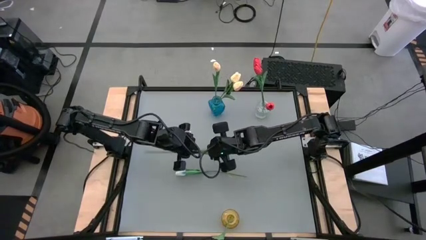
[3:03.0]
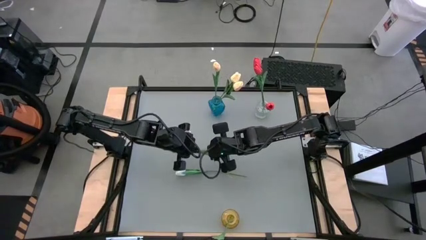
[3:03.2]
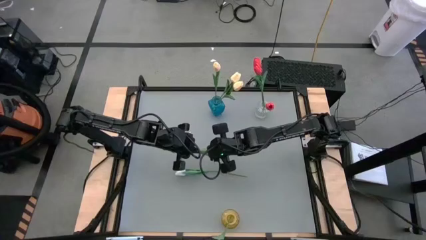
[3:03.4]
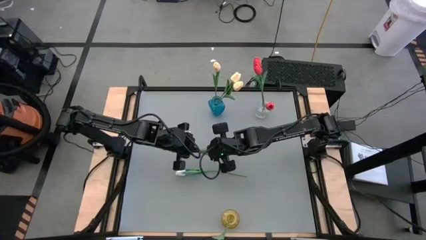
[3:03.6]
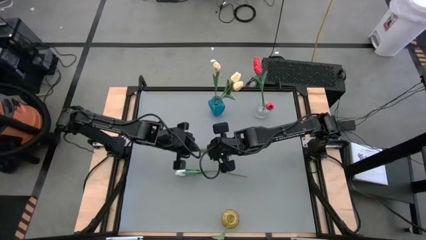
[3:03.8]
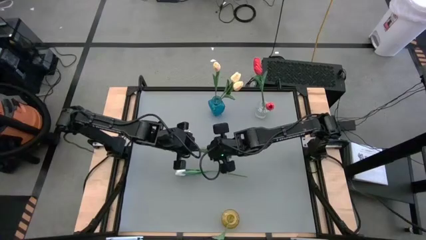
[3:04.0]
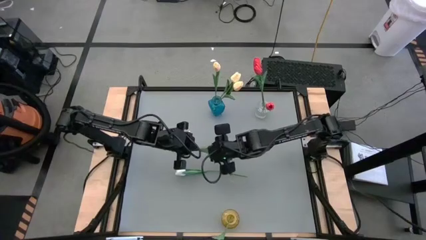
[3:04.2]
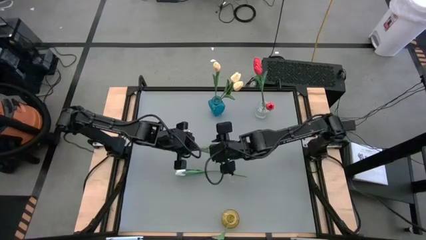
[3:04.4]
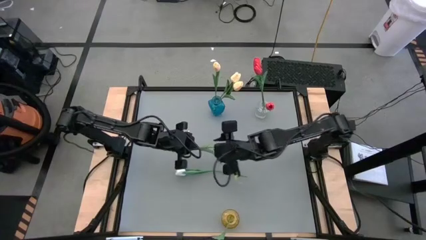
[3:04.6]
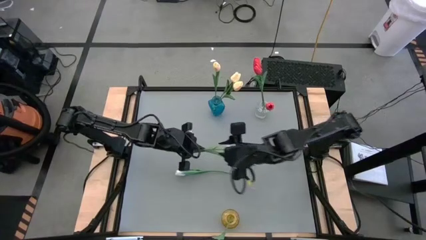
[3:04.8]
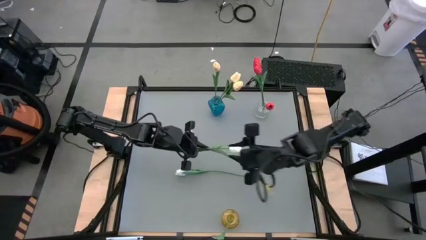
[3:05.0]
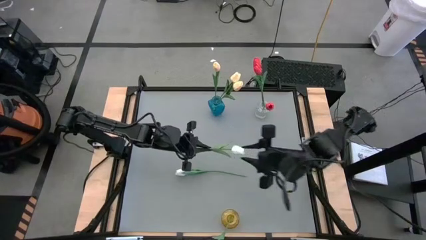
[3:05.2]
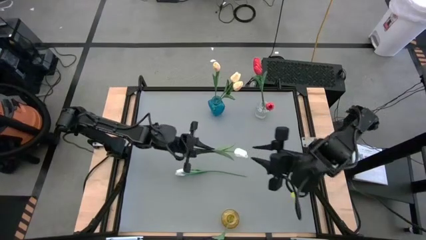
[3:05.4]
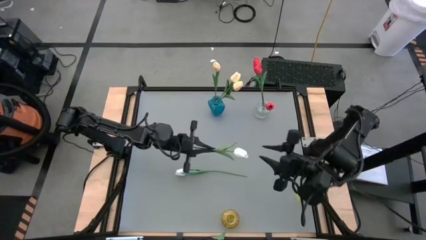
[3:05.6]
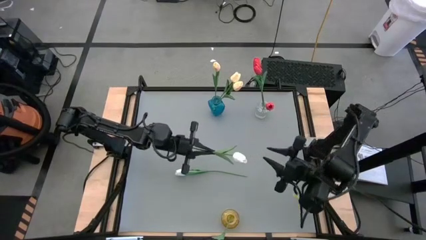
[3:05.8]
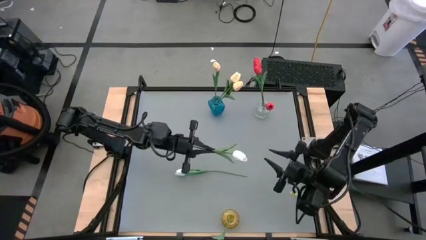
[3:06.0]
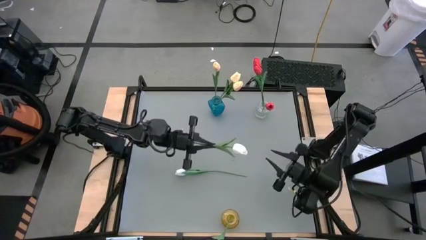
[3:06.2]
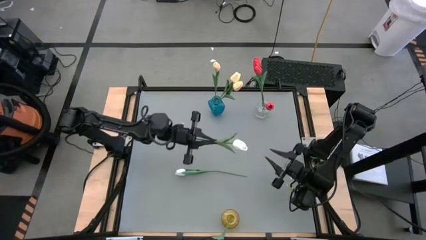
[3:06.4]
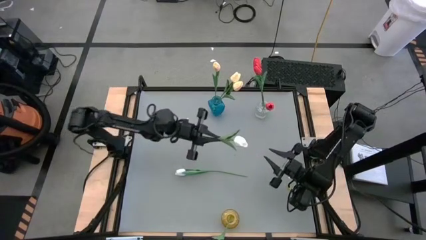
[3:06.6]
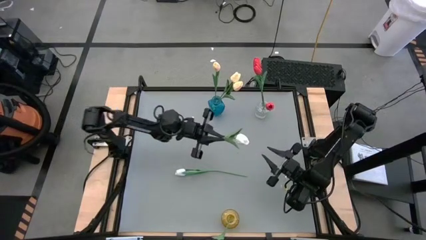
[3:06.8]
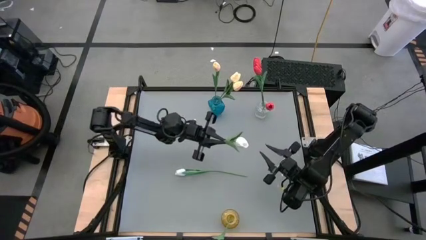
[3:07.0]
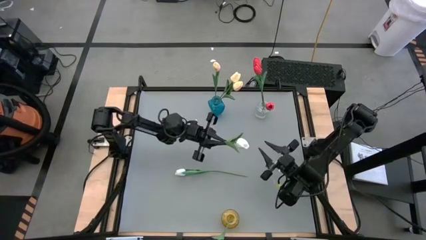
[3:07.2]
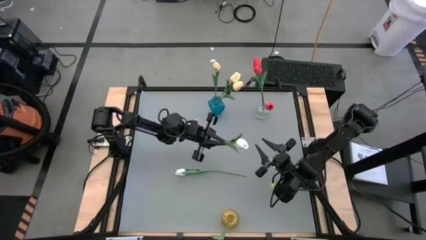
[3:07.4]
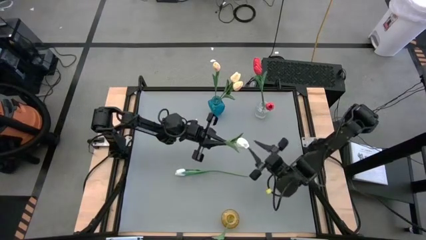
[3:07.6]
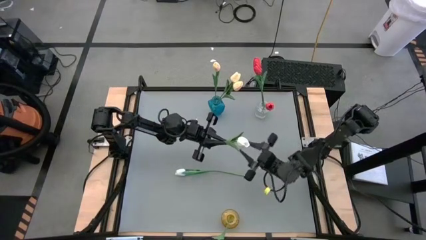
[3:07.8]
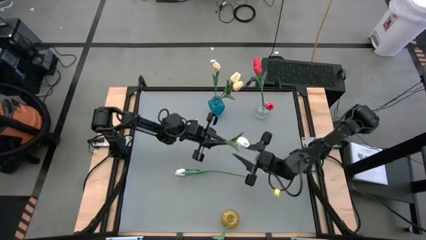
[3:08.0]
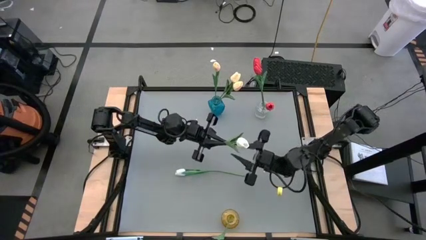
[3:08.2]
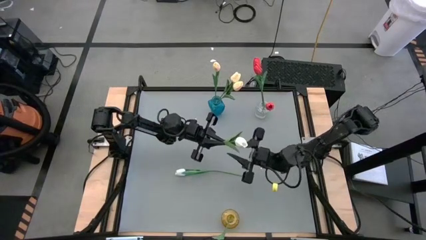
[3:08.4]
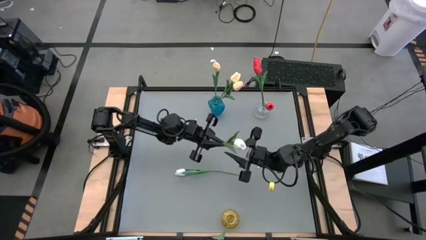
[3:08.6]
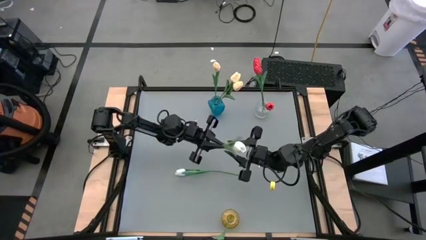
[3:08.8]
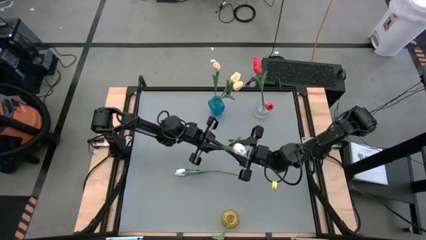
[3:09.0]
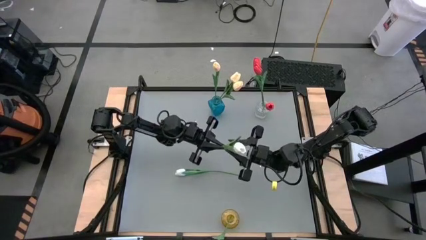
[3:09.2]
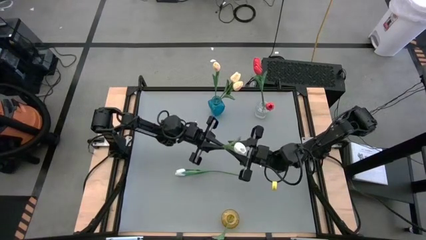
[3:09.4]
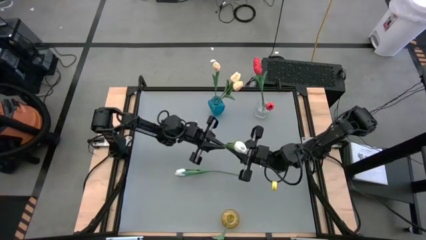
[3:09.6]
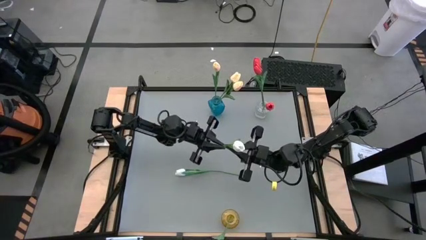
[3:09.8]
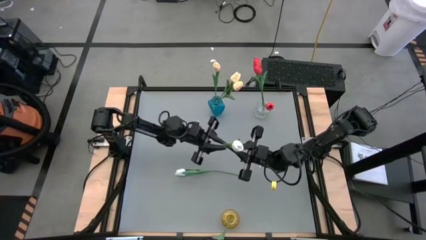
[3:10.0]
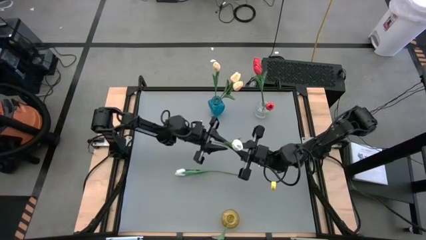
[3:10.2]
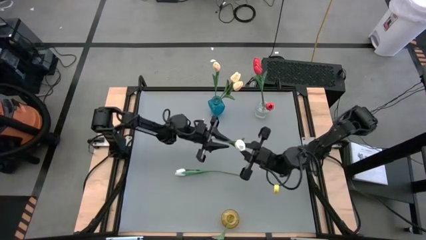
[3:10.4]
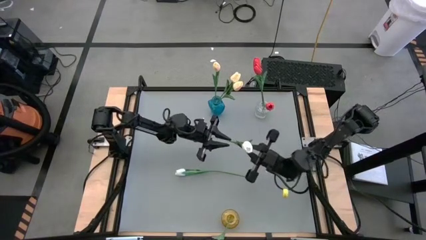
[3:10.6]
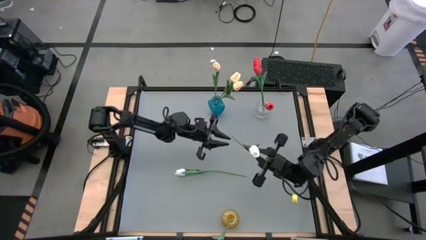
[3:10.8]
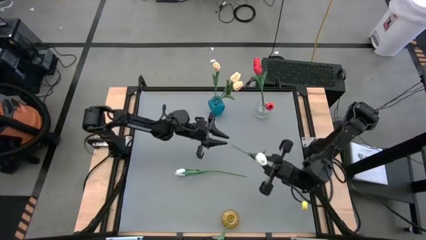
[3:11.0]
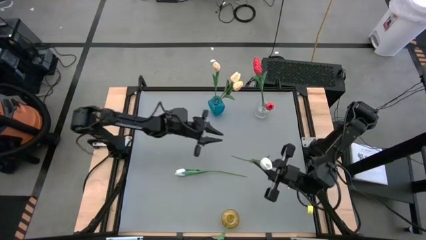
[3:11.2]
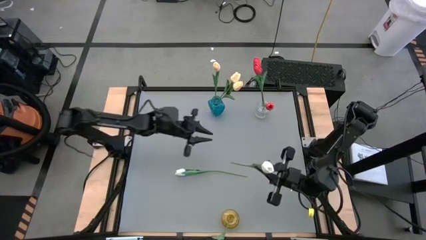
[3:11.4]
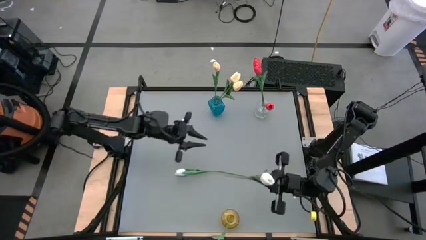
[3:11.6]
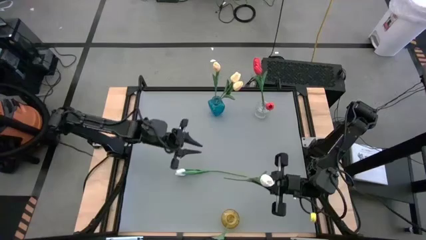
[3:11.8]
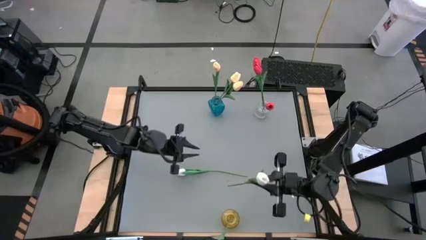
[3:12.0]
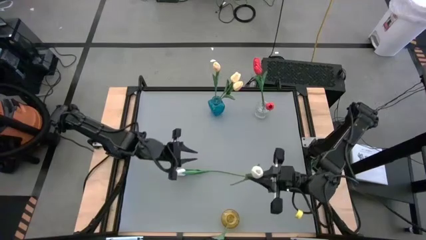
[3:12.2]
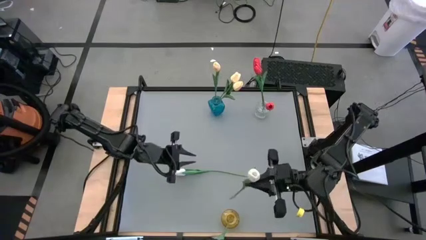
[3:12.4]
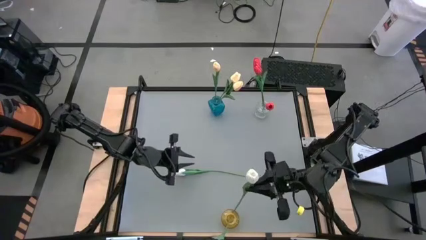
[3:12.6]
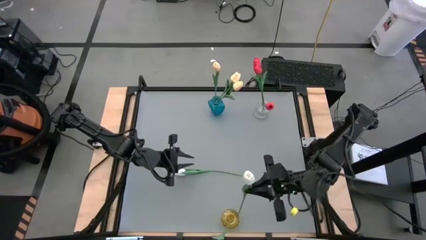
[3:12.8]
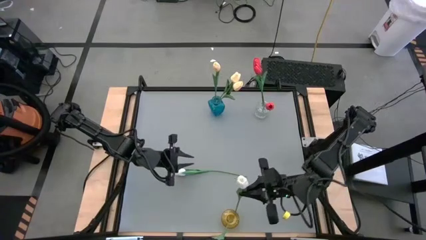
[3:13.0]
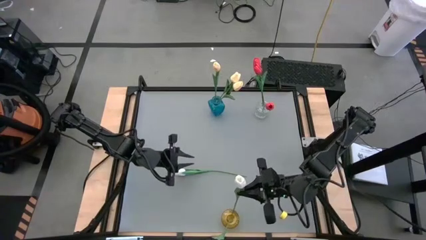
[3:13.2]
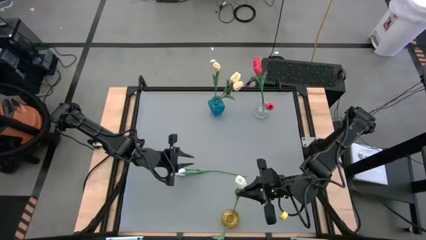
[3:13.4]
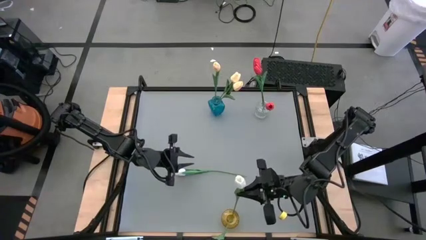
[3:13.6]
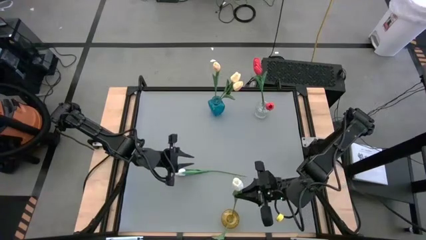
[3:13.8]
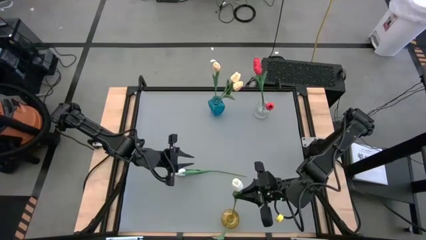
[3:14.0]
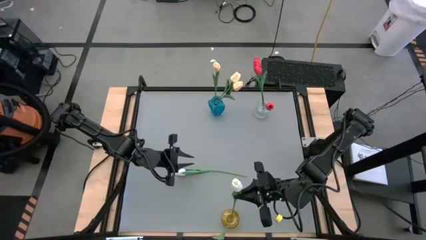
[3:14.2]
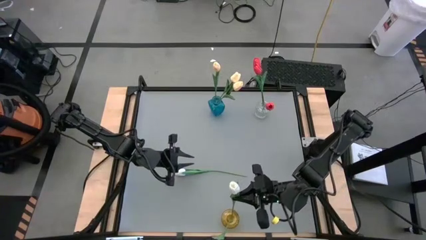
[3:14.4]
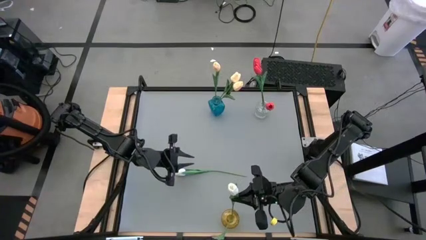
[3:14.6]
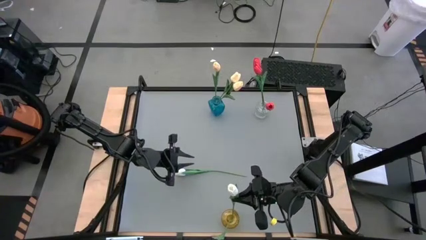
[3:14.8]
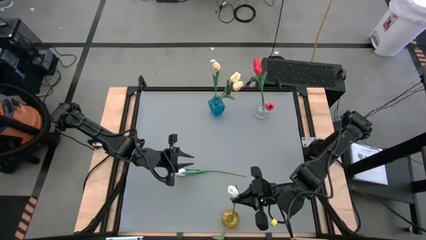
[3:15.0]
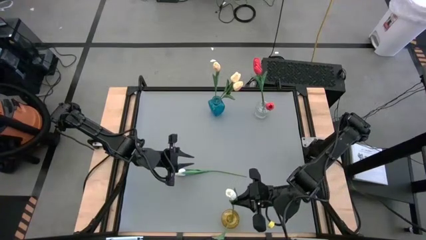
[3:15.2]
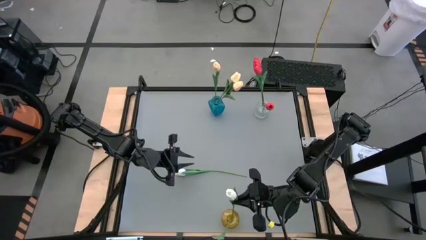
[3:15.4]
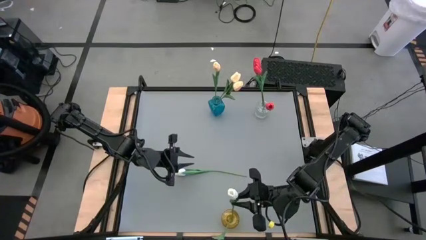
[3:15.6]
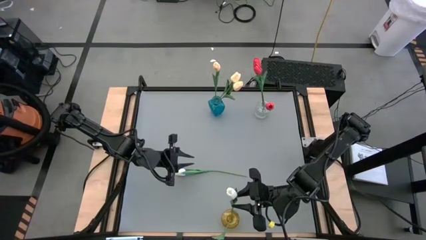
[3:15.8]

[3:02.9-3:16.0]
Task: Sort flowers into vase by color
Put the top white flower into the yellow vase
